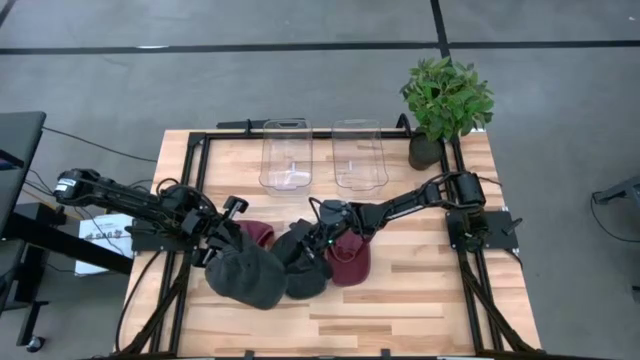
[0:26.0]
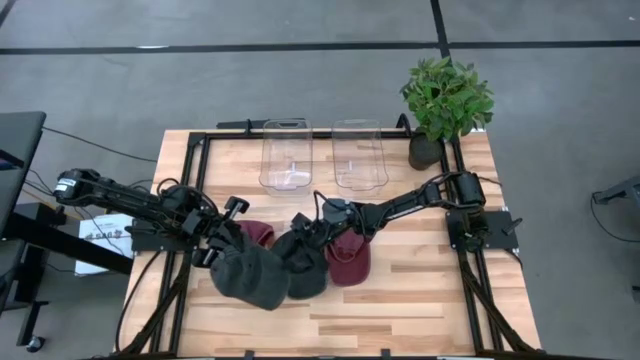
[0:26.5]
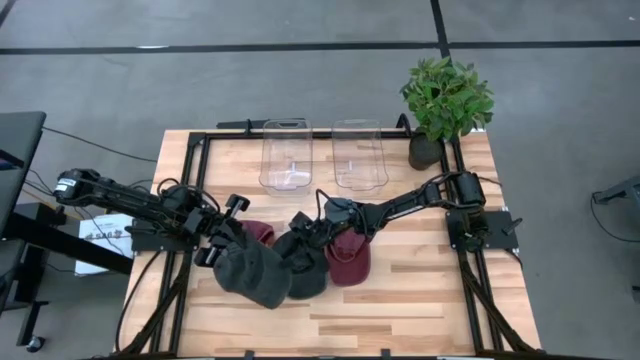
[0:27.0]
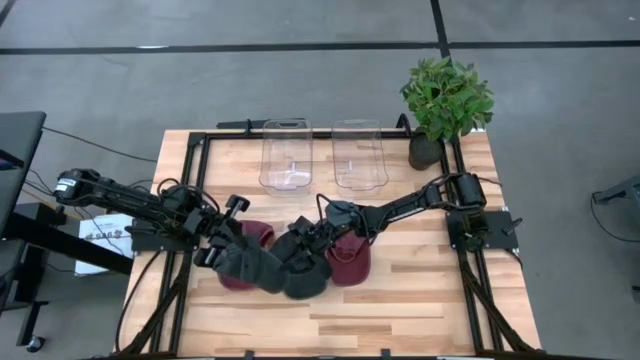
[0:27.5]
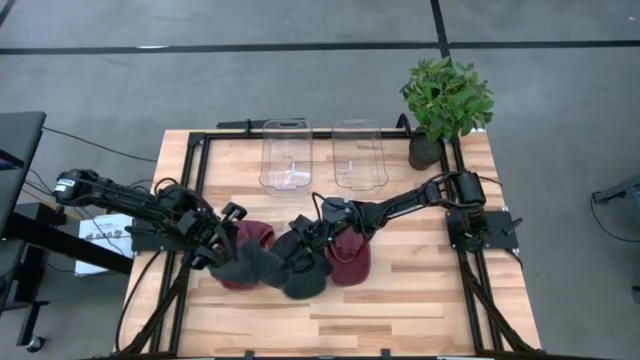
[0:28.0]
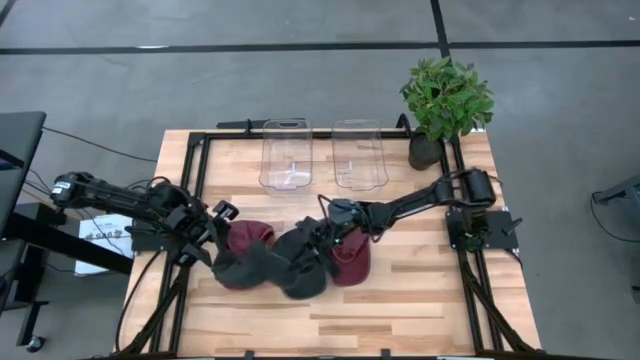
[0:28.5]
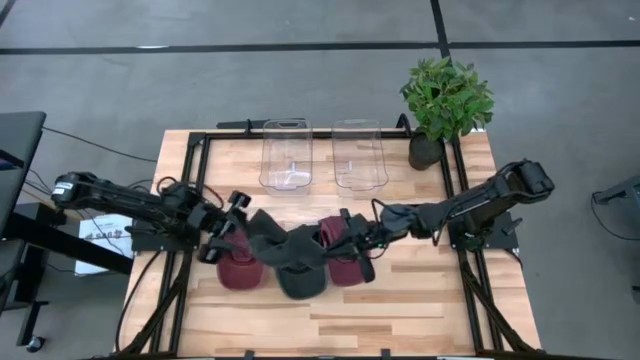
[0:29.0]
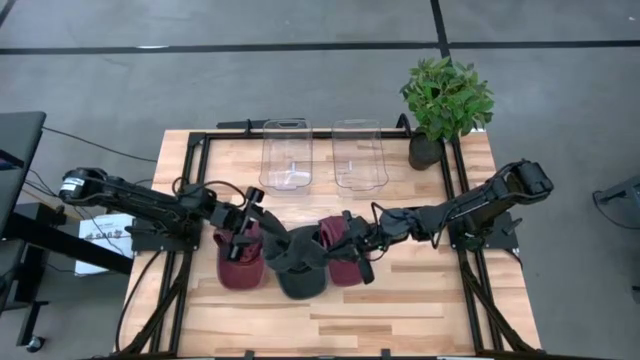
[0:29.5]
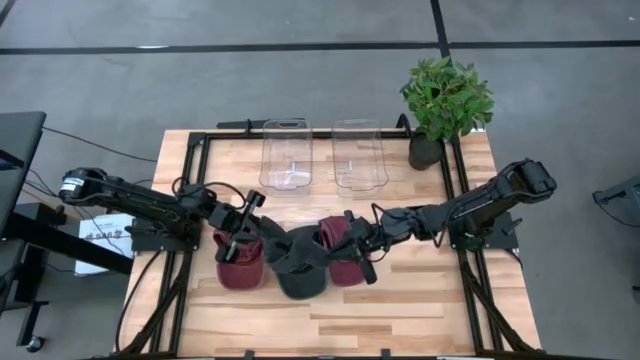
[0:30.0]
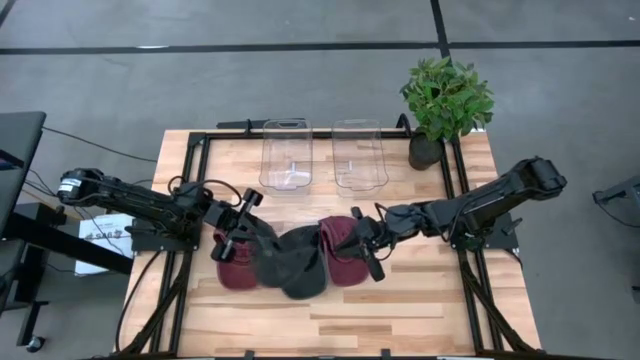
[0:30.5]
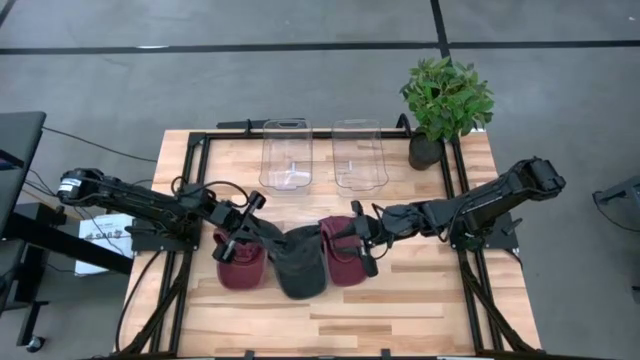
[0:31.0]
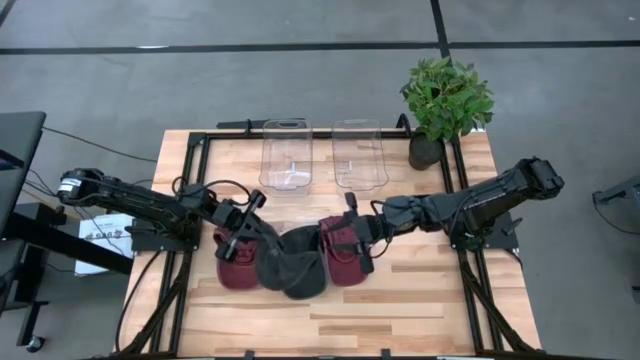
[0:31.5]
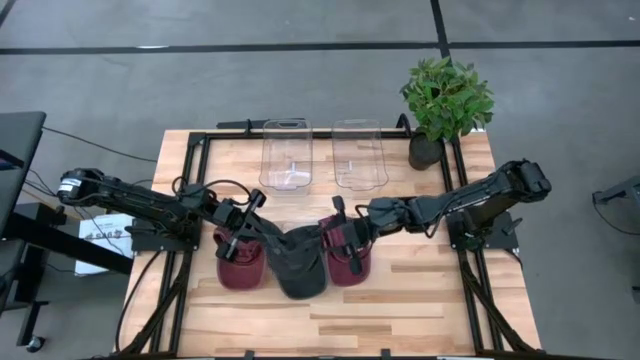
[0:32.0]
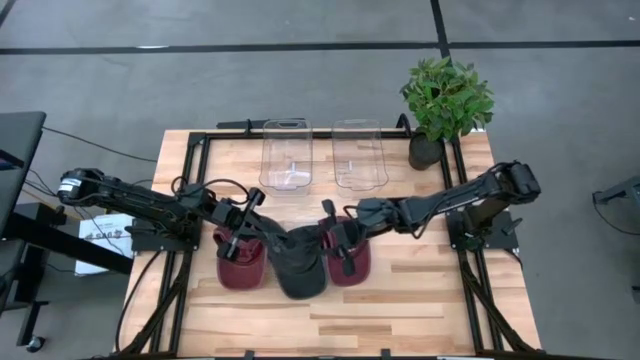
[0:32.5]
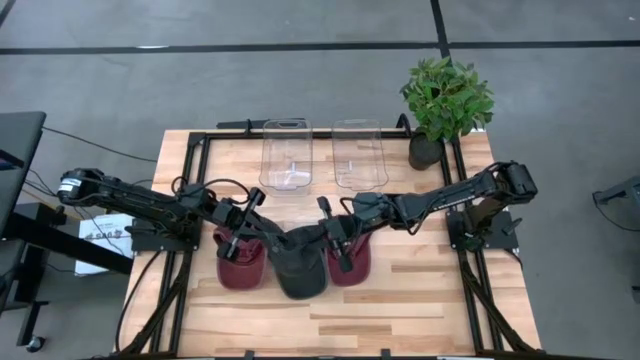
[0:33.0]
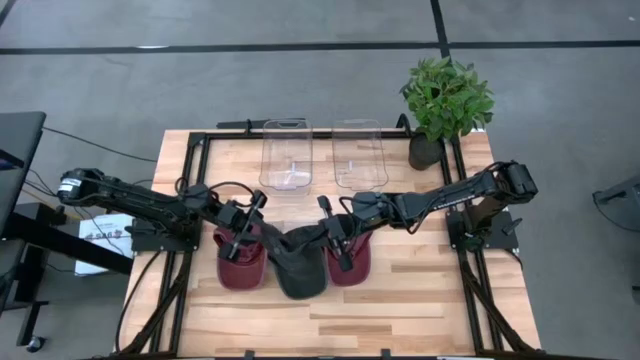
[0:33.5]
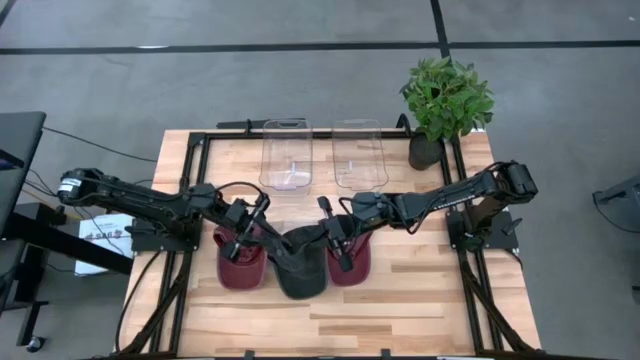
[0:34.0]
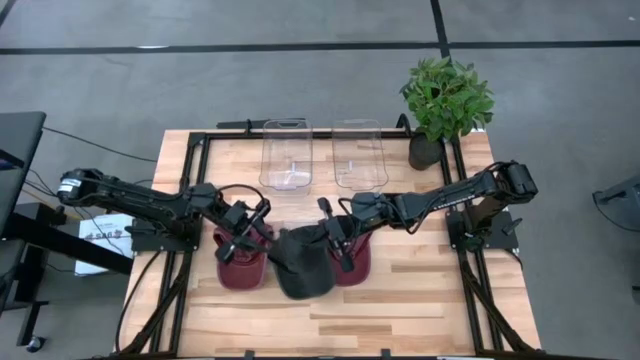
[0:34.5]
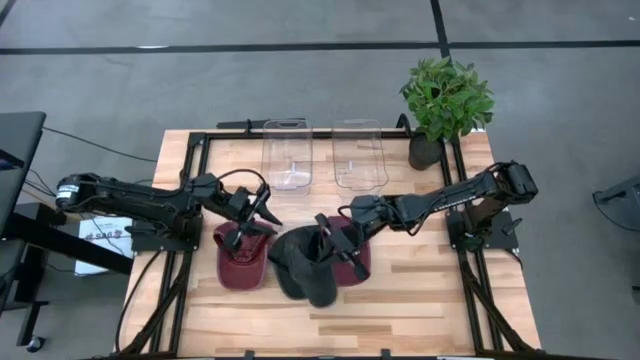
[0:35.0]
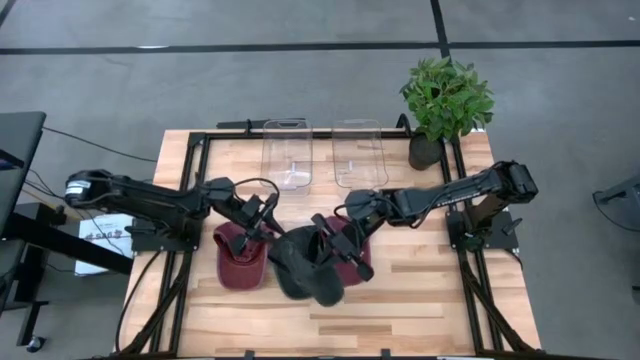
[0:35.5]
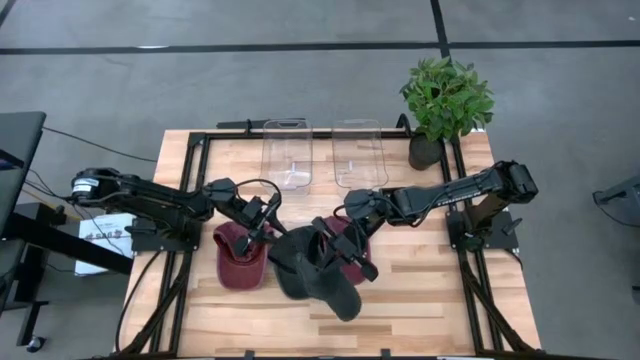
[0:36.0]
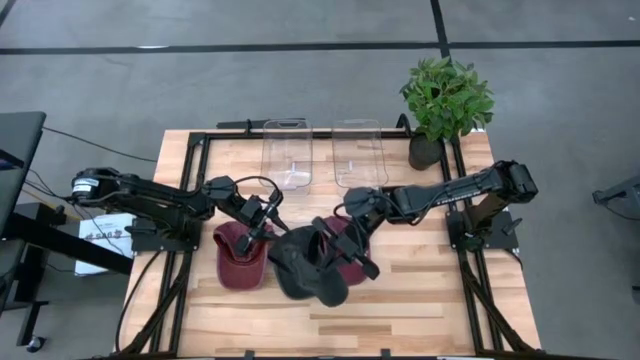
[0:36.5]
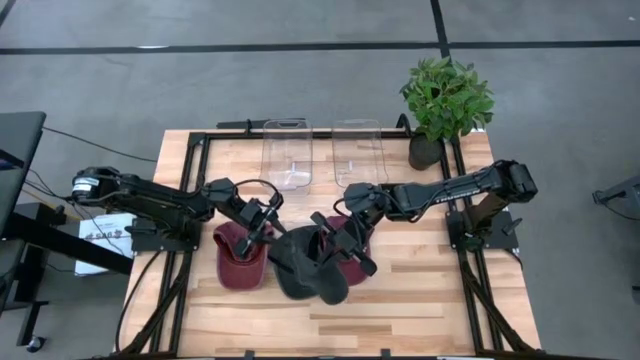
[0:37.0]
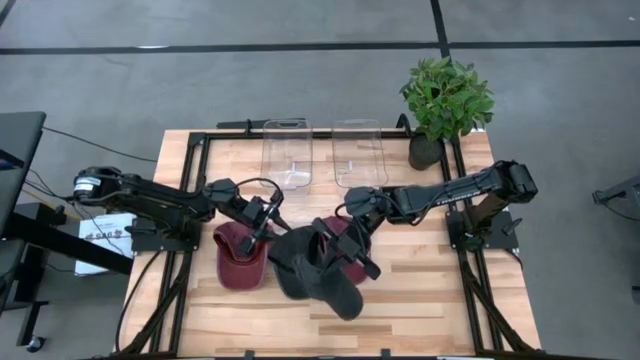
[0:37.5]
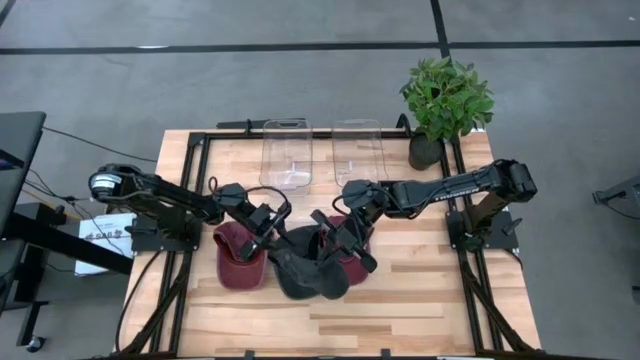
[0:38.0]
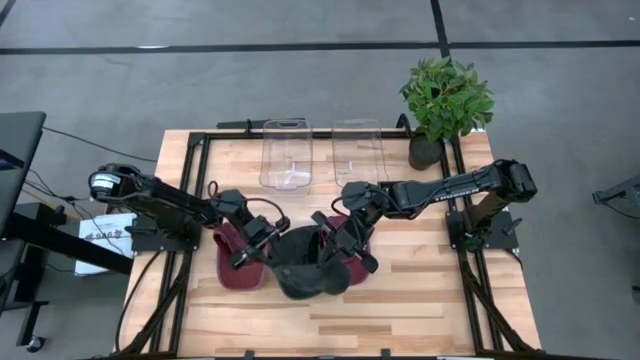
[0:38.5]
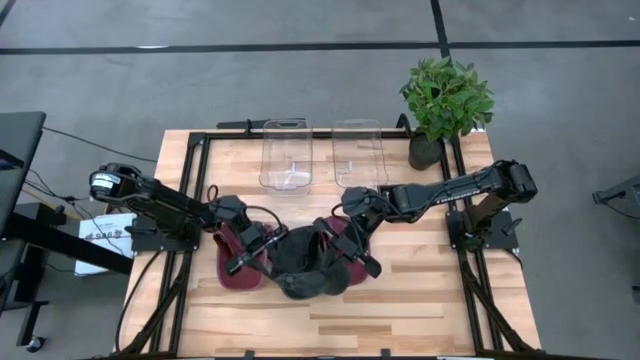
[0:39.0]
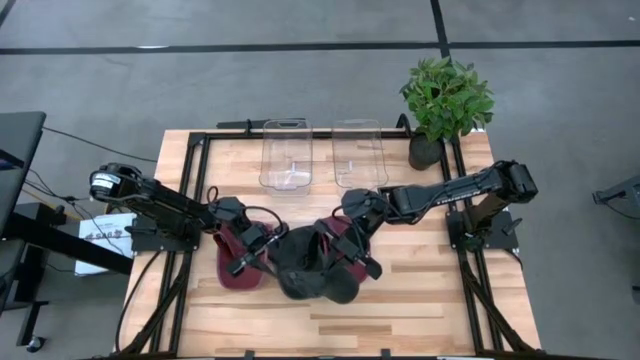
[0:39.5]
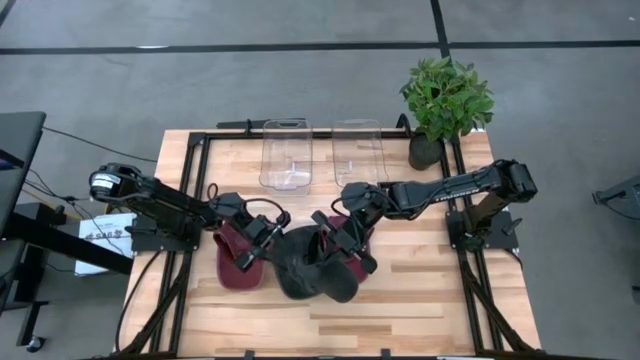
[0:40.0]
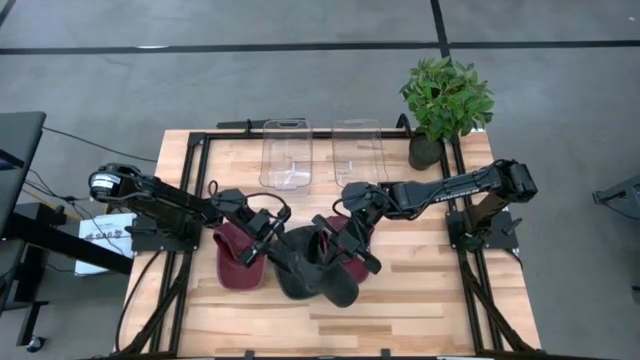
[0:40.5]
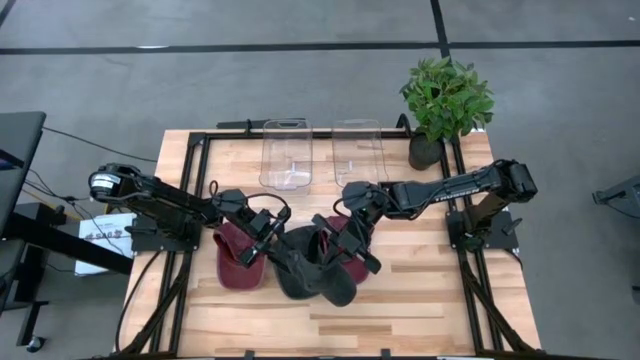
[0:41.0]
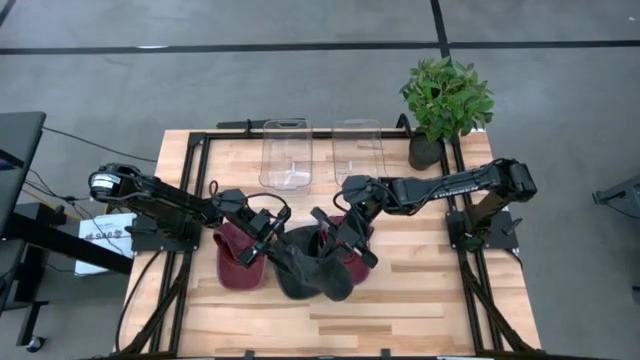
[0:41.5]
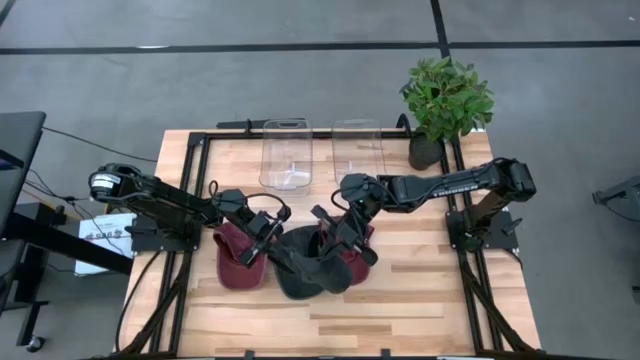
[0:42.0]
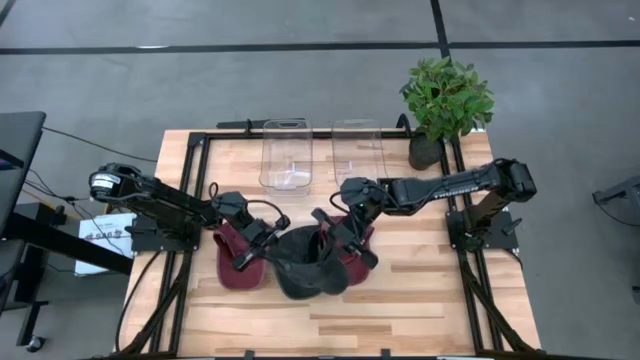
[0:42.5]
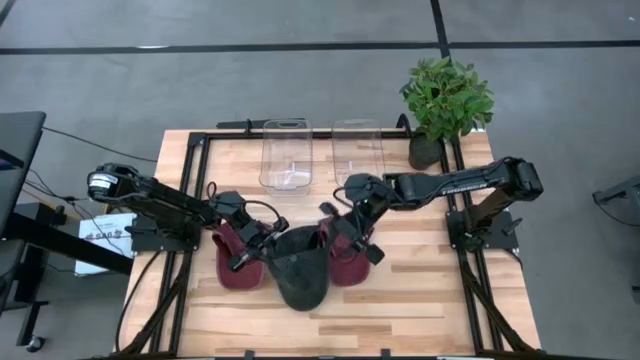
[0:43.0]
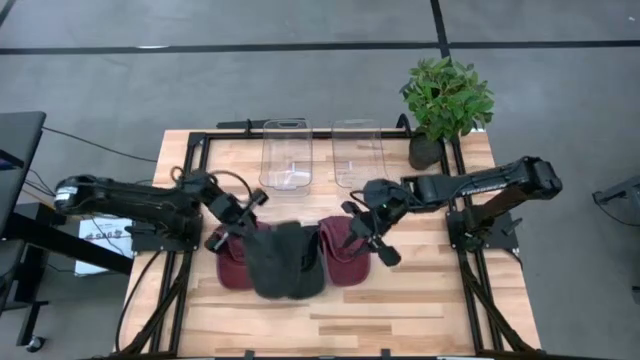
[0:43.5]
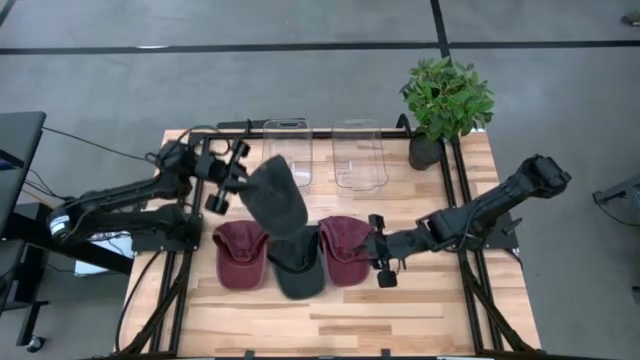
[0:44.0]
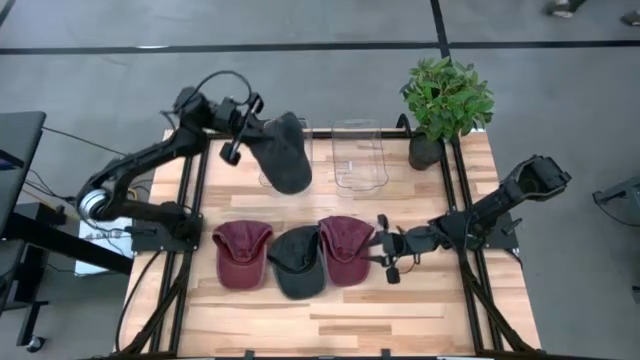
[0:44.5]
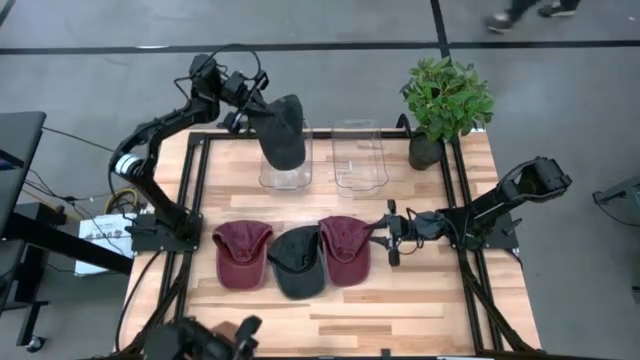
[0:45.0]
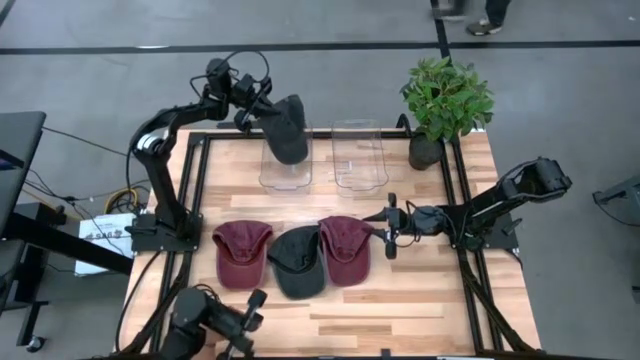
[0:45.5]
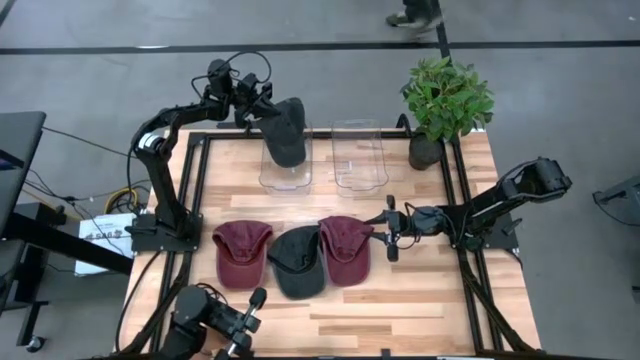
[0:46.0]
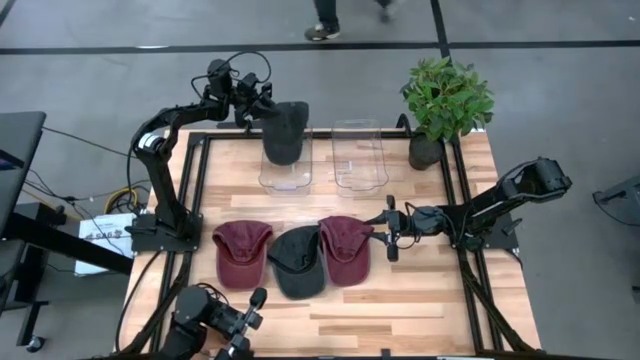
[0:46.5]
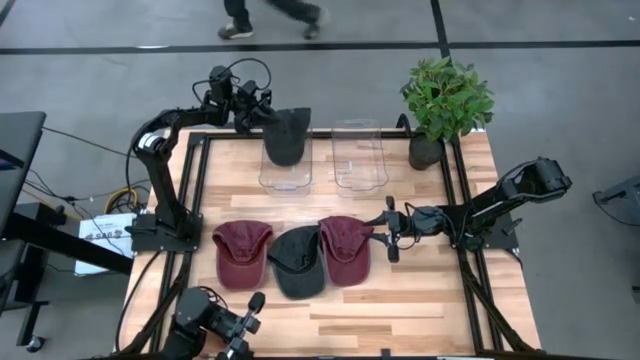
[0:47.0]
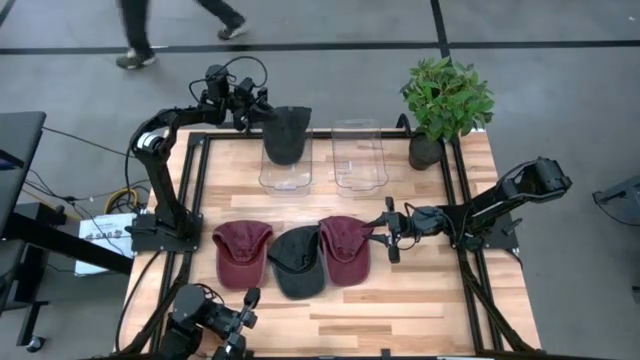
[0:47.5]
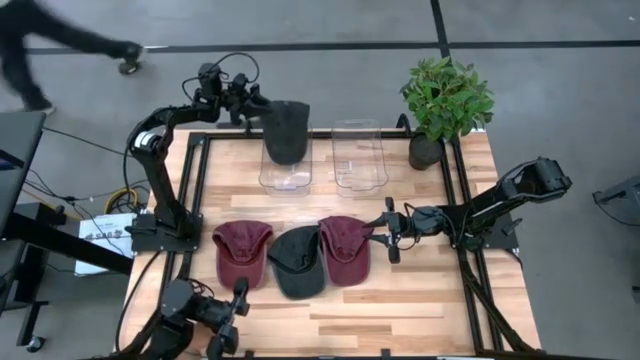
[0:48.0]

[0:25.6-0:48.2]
Task: Pick & Place hat
Put the right black cap into the left transparent bin
